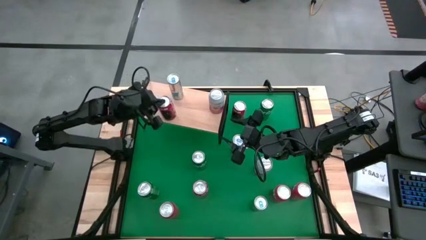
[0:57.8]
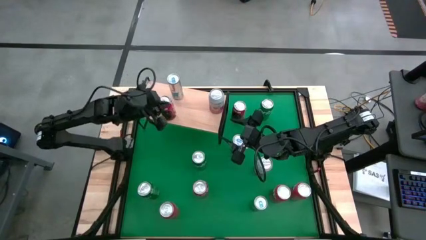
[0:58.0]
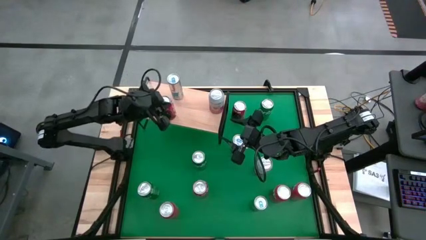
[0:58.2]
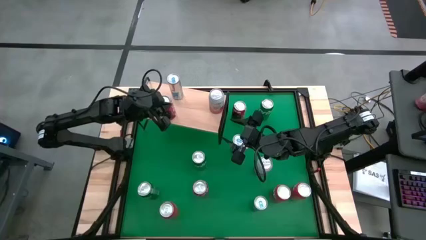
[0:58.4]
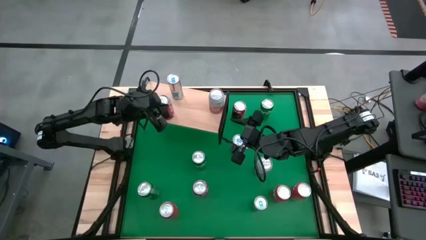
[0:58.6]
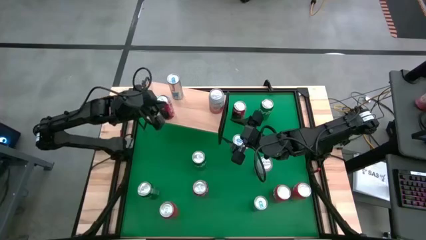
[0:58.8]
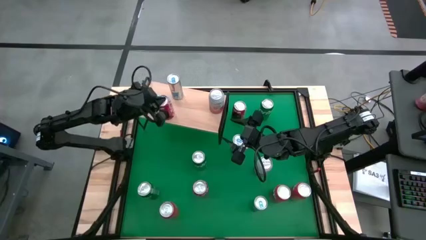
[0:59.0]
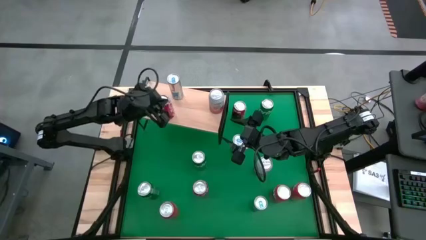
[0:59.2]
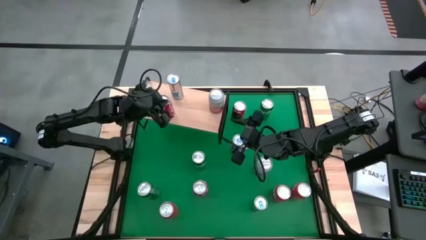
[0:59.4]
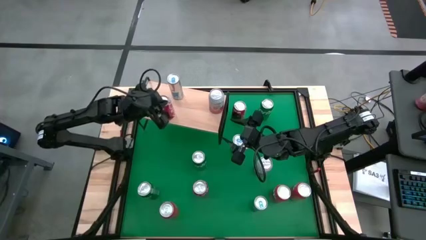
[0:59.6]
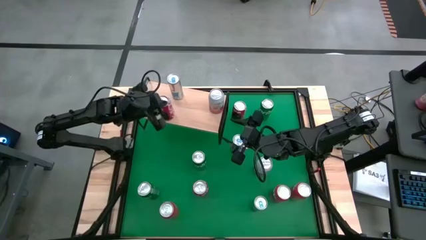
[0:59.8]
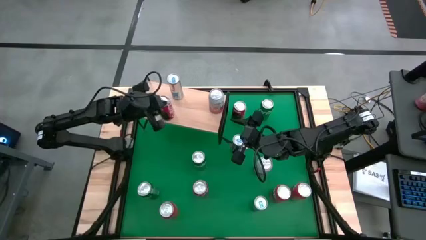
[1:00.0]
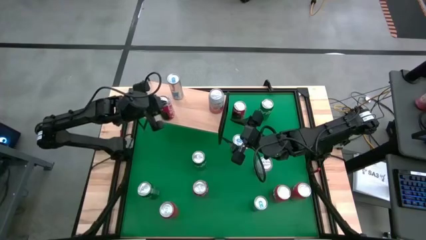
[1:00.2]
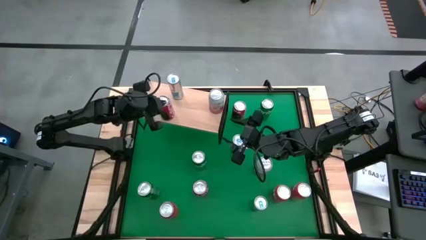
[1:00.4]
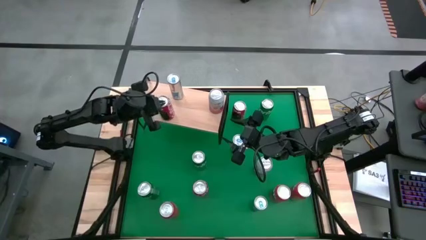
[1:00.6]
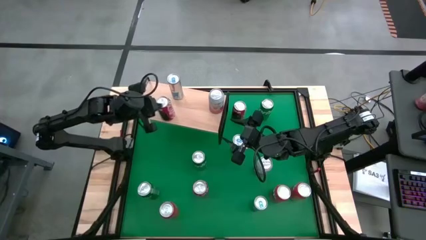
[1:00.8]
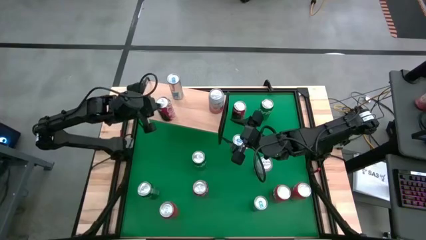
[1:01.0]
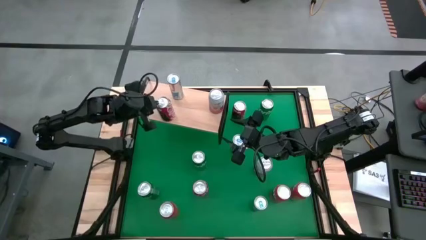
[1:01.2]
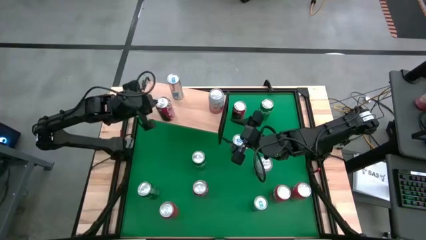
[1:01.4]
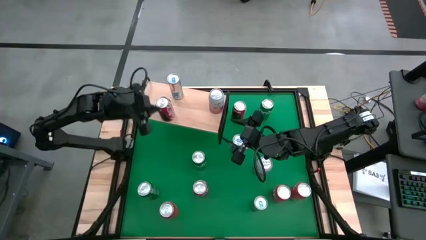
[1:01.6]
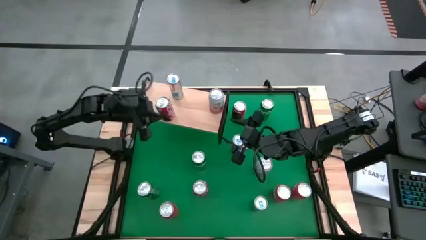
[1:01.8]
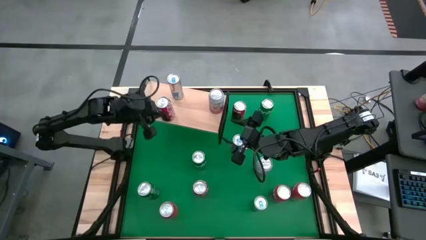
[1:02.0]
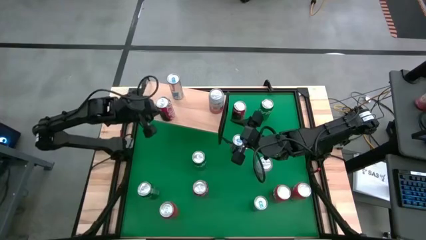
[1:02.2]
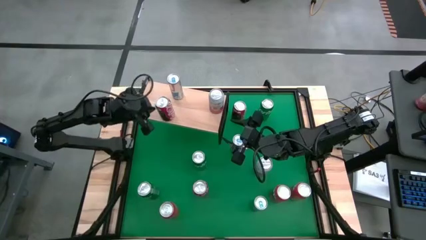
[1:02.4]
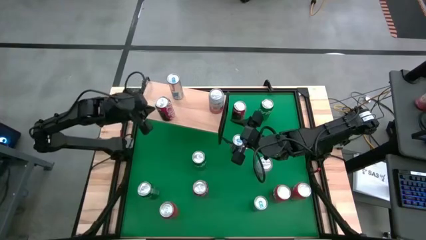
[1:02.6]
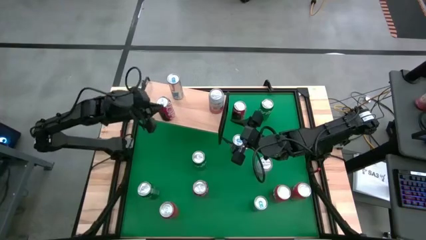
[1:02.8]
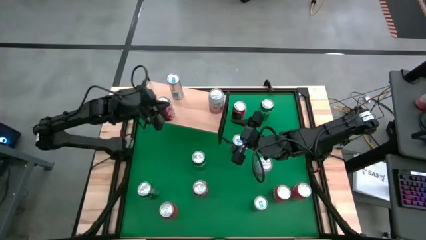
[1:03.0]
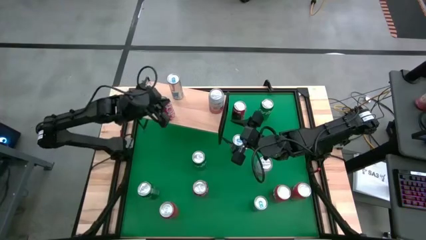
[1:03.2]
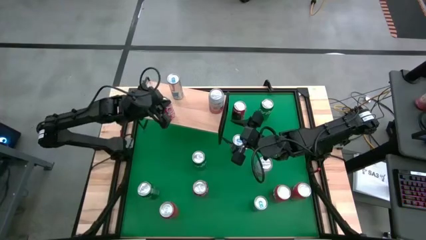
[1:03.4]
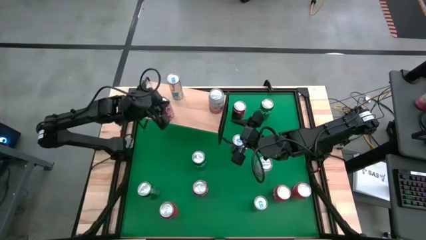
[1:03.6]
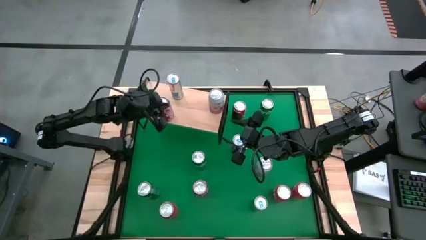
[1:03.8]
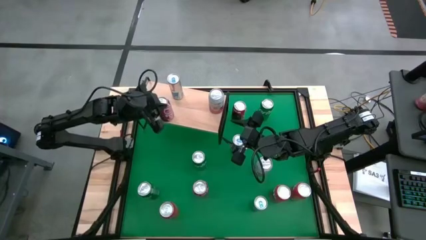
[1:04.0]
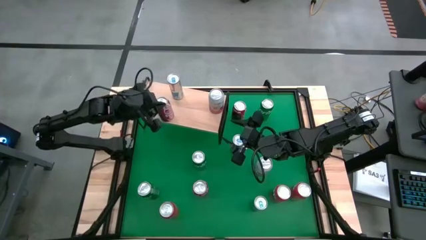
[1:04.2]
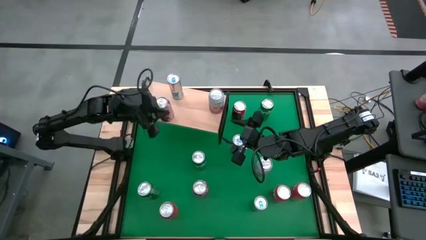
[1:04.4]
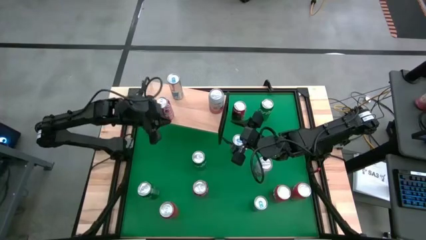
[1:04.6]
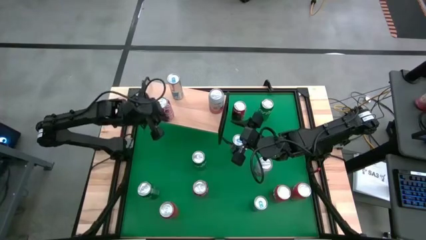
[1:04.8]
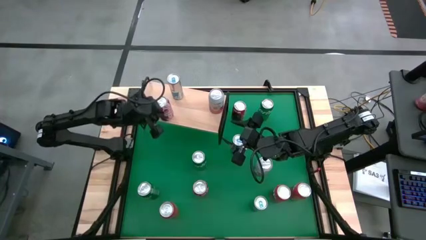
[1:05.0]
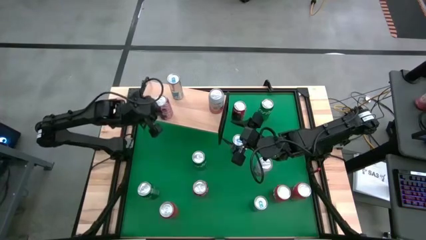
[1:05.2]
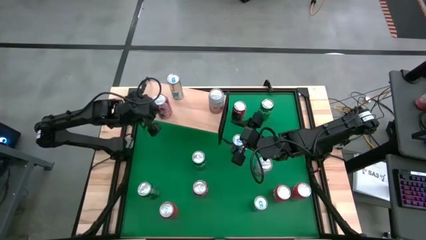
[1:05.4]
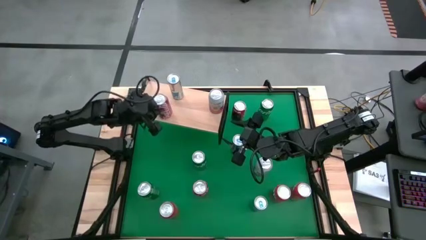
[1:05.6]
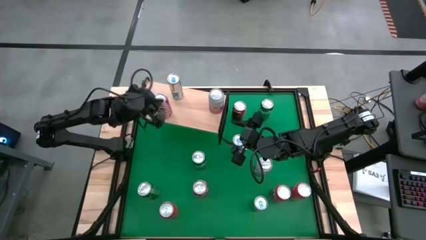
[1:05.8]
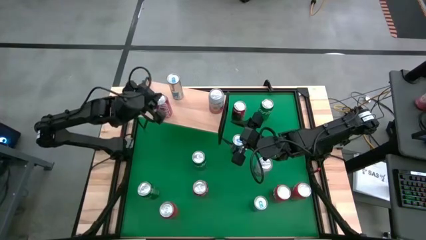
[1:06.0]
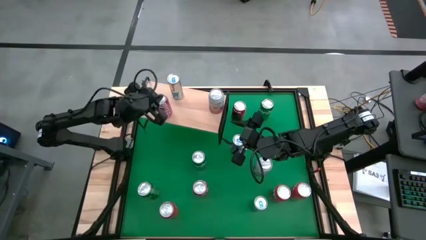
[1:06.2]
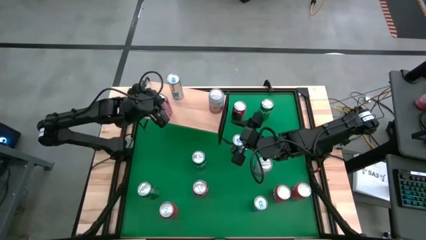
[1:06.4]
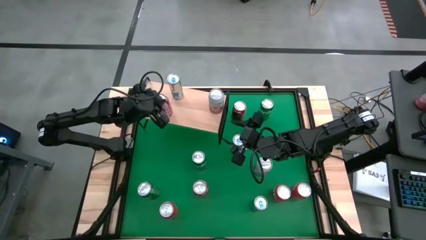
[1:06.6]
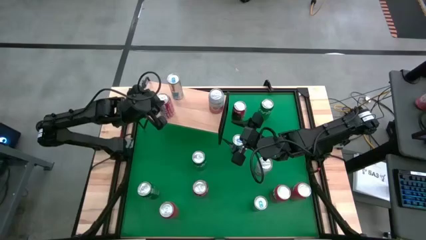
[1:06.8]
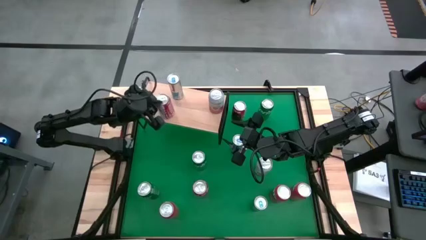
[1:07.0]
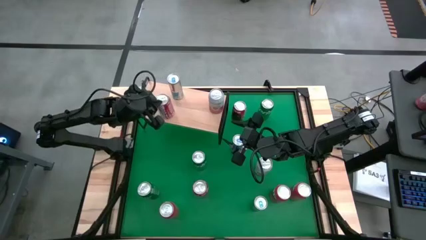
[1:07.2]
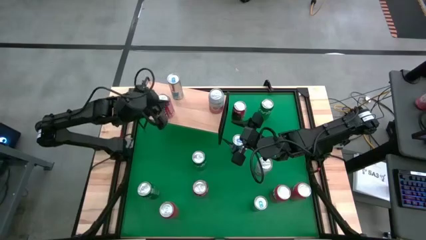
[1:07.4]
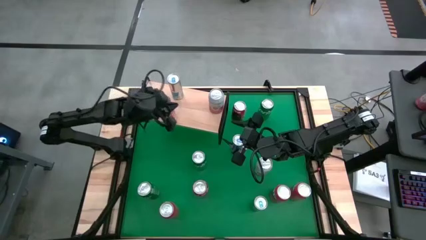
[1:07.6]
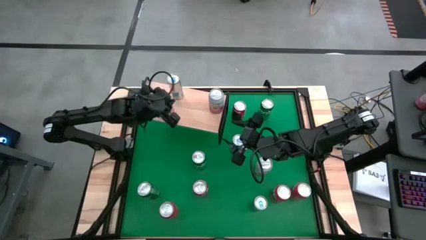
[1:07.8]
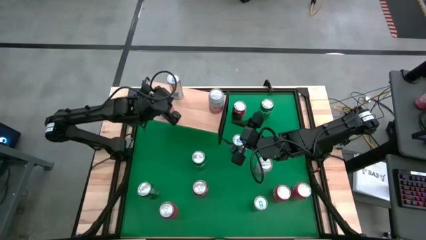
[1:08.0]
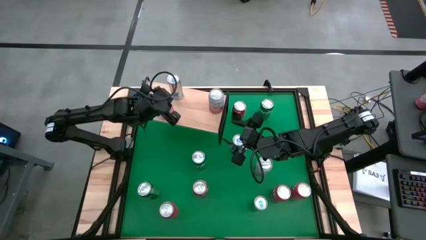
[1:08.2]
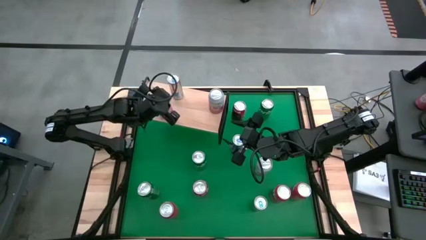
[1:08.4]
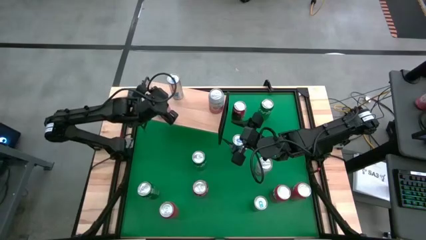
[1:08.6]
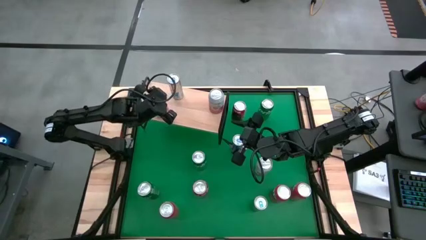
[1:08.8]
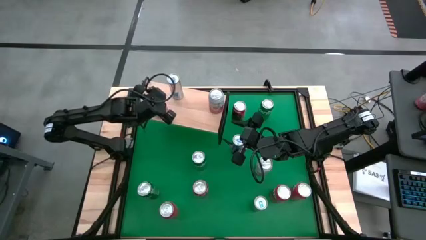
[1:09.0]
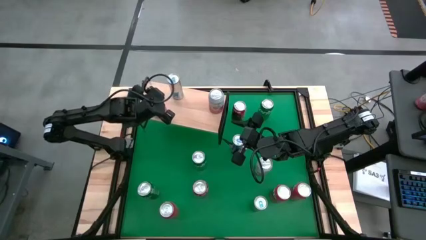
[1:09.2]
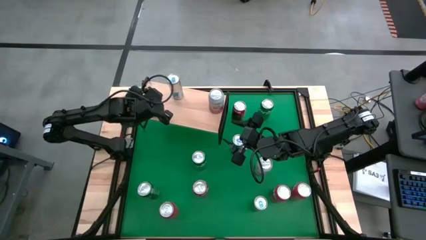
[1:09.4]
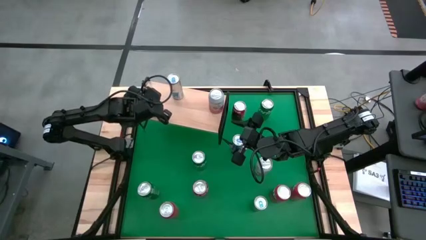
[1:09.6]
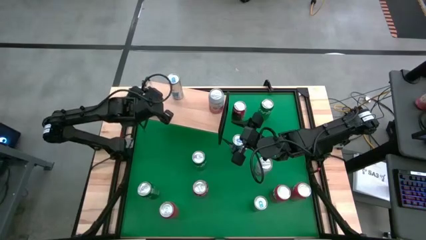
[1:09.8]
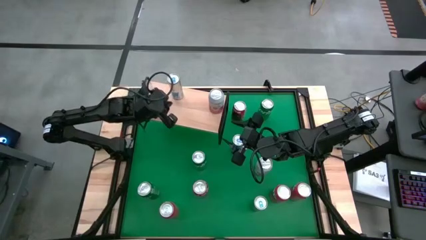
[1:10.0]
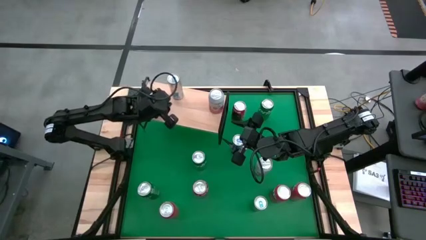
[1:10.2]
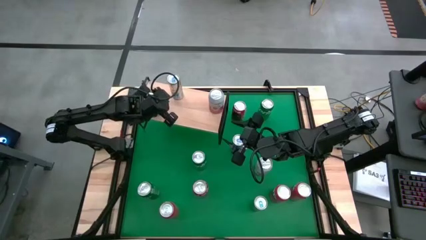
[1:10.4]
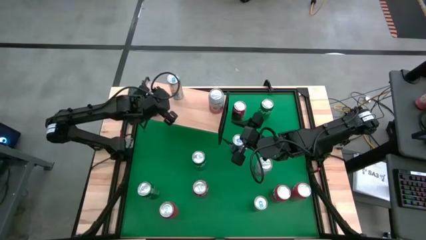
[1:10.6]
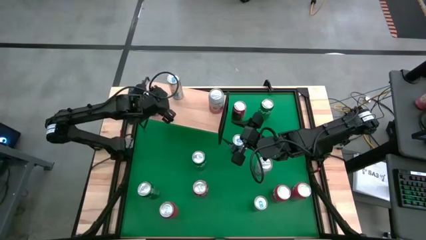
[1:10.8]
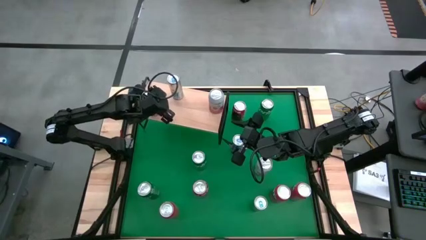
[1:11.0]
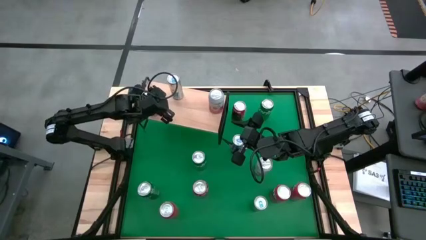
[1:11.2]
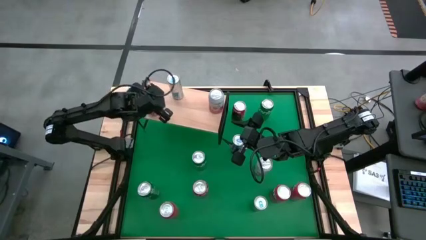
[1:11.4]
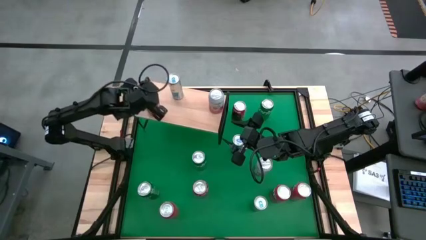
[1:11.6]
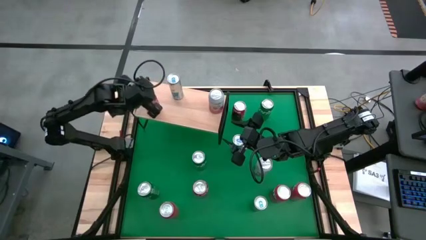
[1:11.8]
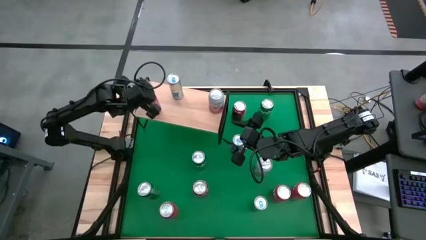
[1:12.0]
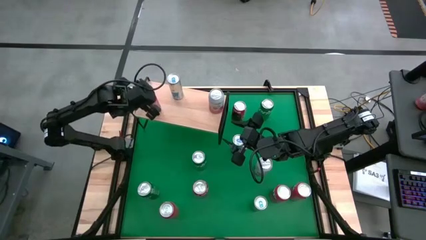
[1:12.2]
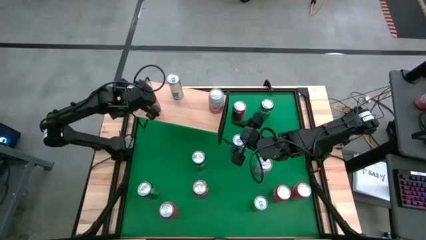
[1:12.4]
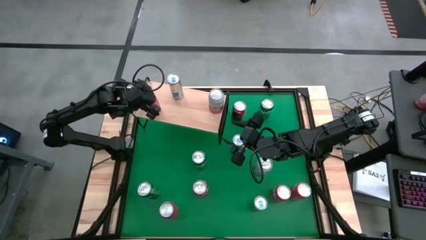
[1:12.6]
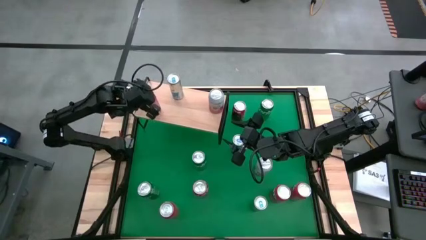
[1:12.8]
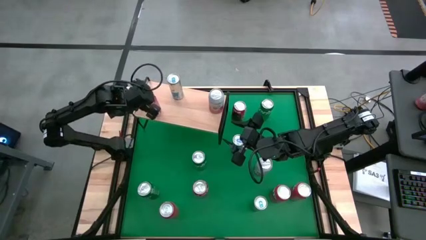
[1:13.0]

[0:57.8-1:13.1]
Task: Place canned beverage on shelf
Put the red/black soda can on the shelf
